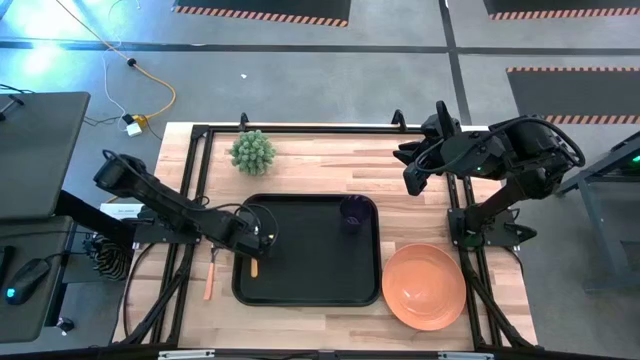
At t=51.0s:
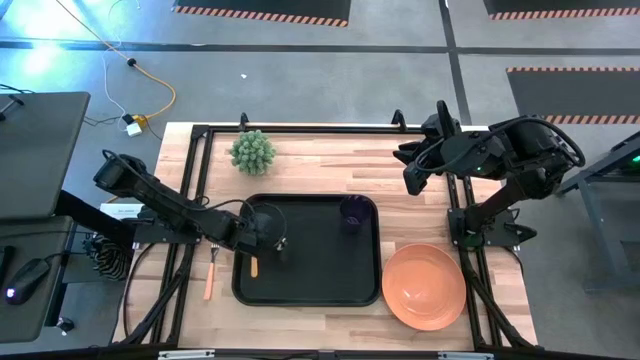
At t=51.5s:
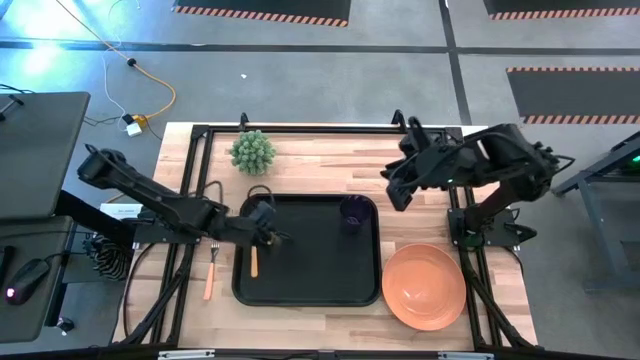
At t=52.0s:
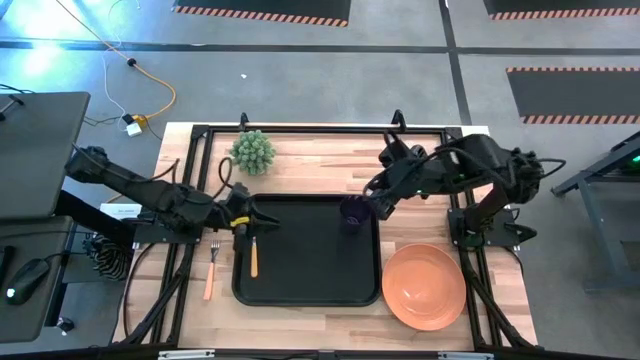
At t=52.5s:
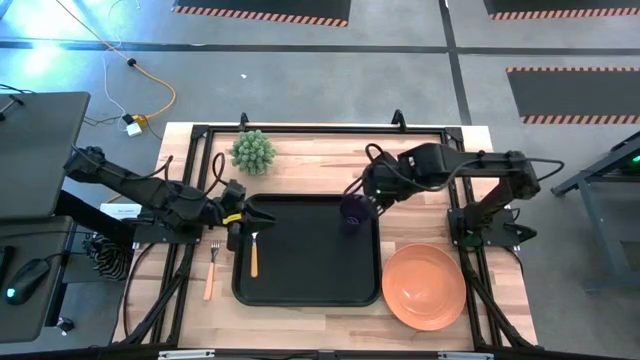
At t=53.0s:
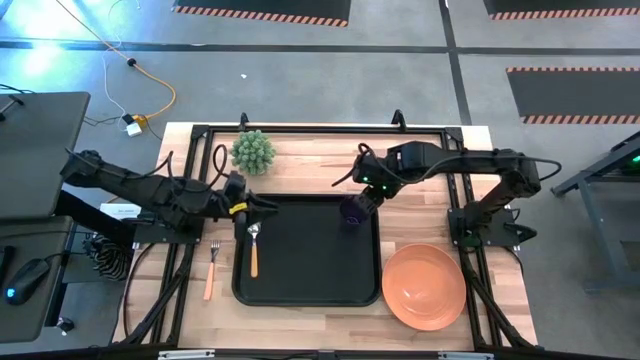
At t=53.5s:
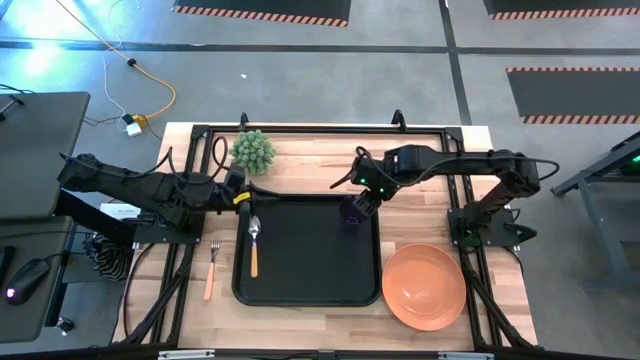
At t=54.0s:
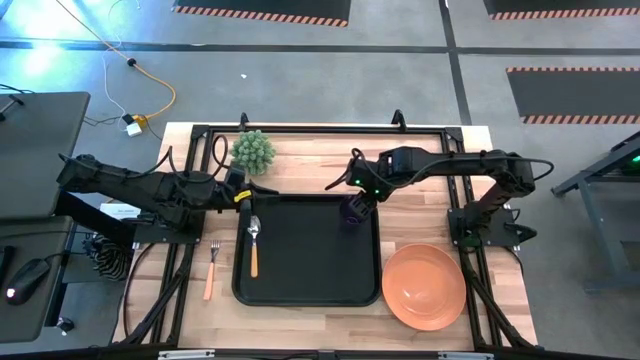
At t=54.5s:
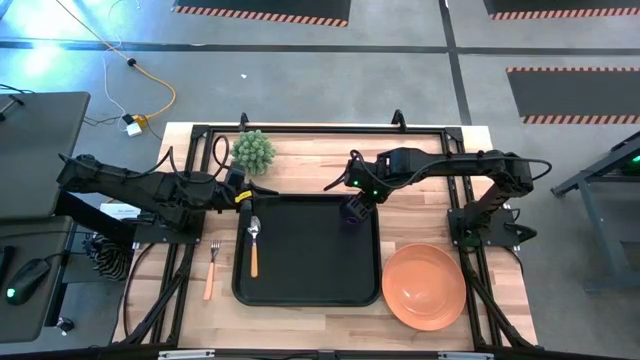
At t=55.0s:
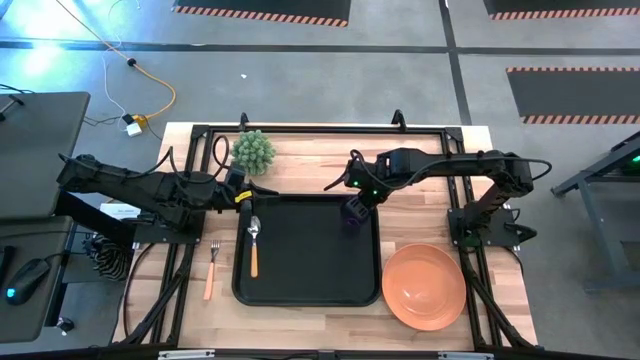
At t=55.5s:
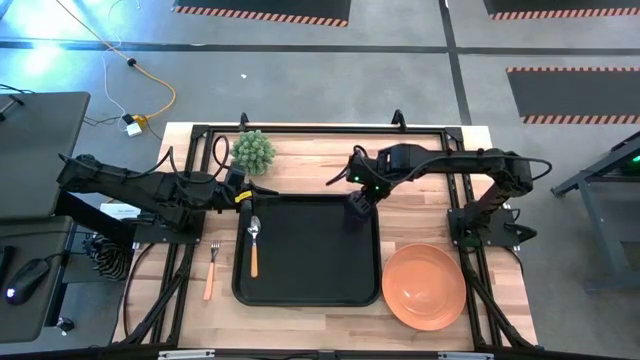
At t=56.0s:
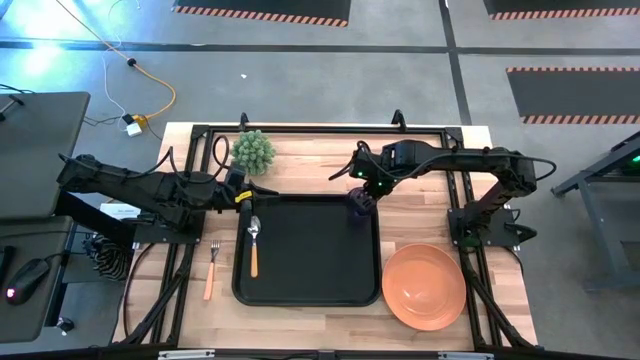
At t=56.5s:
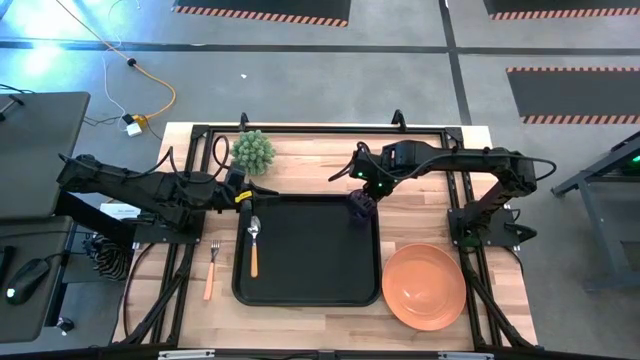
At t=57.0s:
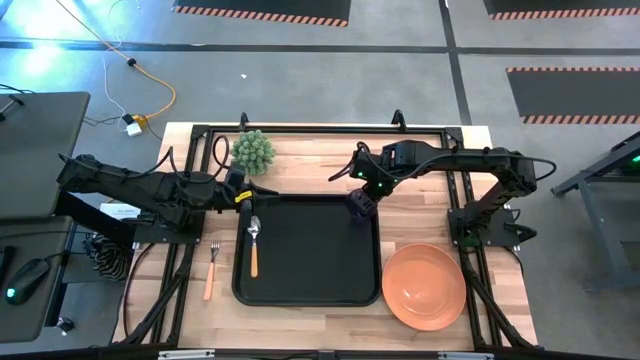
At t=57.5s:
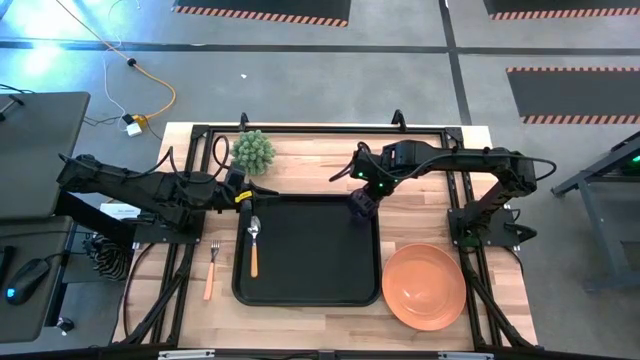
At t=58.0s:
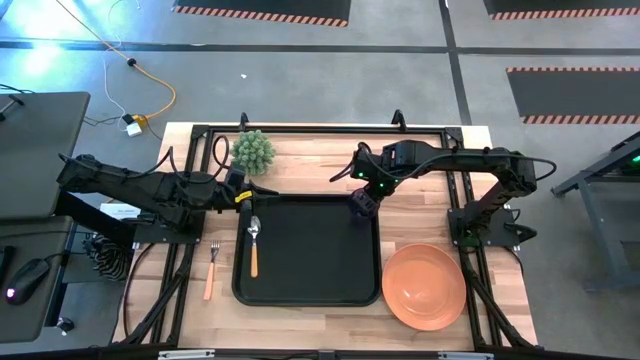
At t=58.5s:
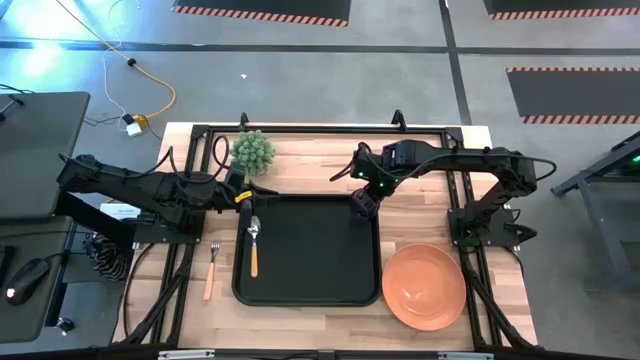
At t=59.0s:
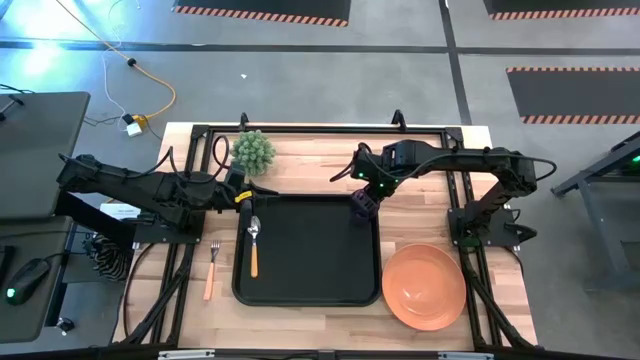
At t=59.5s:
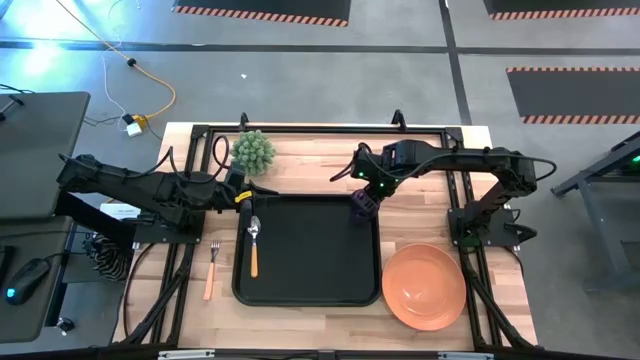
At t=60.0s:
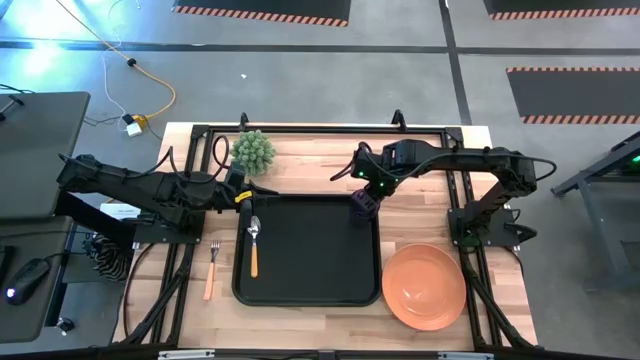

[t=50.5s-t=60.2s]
Task: Pick and place plate/cup/fork/spoon on tray
Adjust the purple cup on the black tray

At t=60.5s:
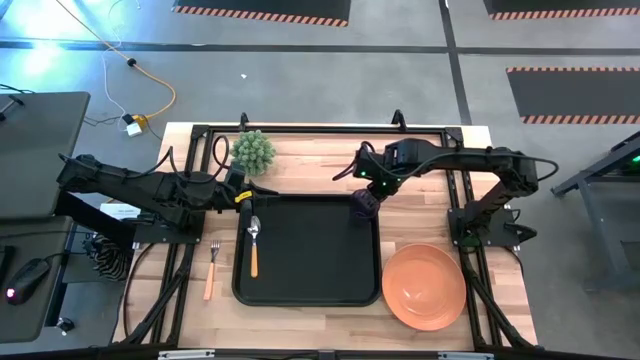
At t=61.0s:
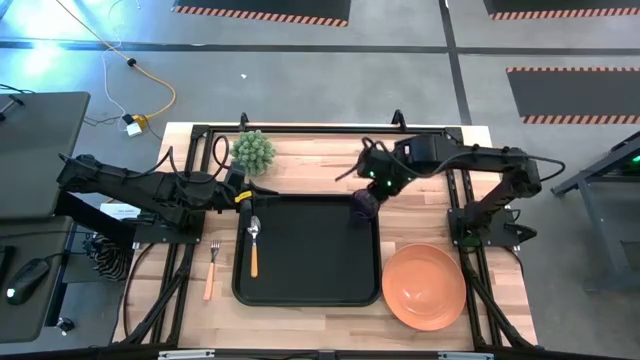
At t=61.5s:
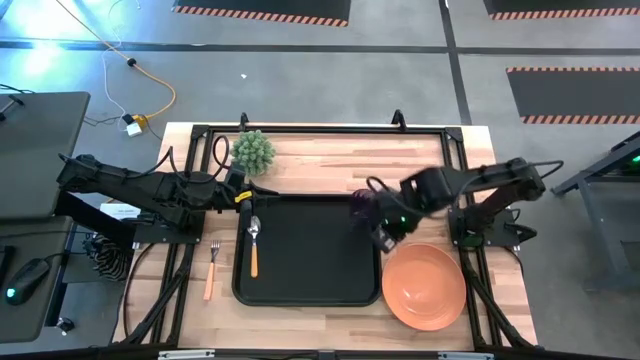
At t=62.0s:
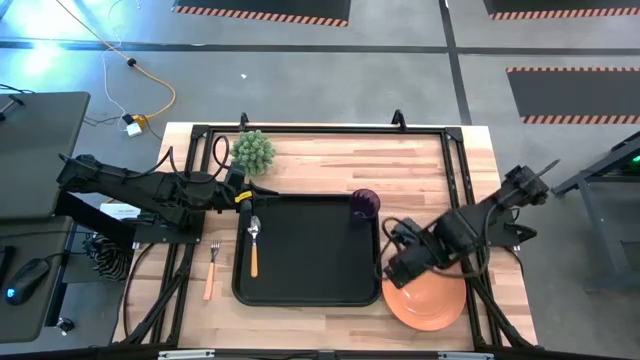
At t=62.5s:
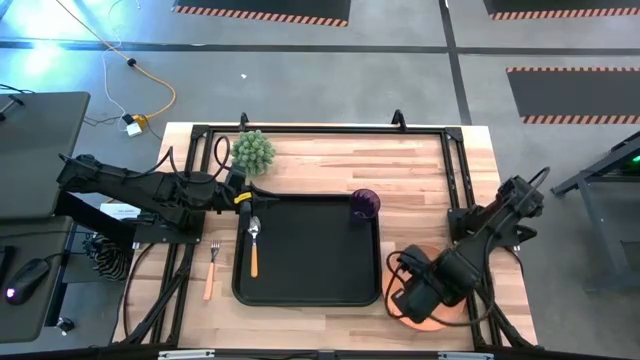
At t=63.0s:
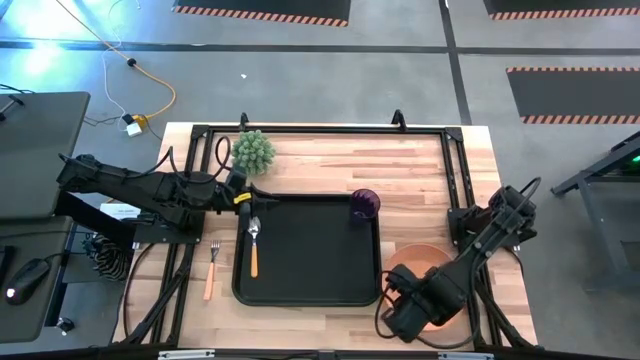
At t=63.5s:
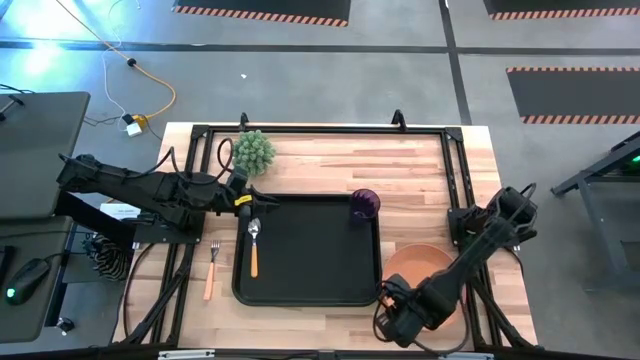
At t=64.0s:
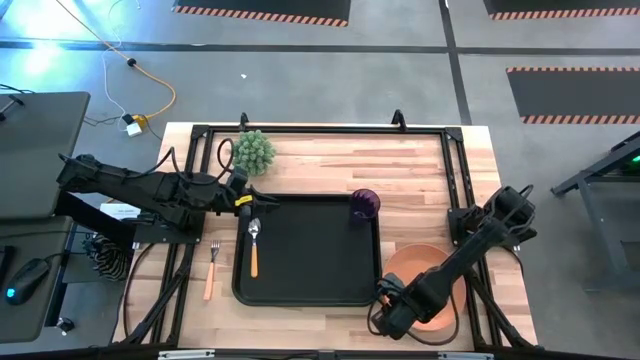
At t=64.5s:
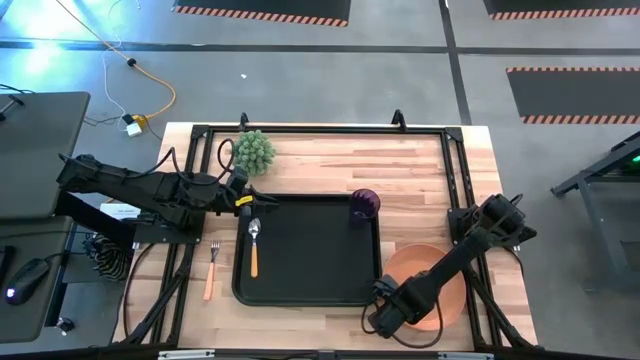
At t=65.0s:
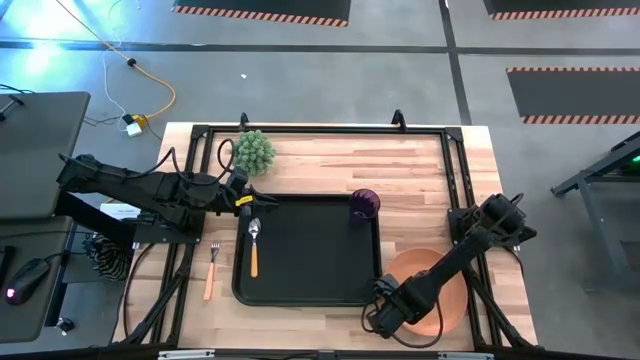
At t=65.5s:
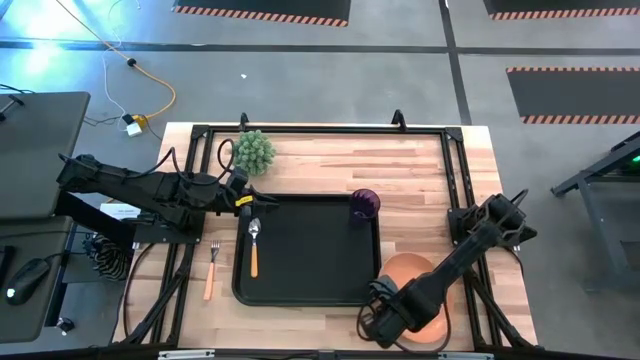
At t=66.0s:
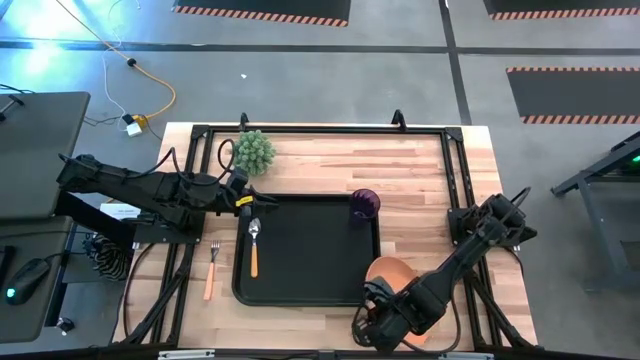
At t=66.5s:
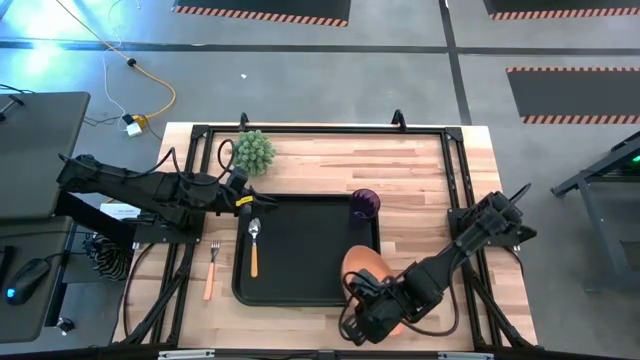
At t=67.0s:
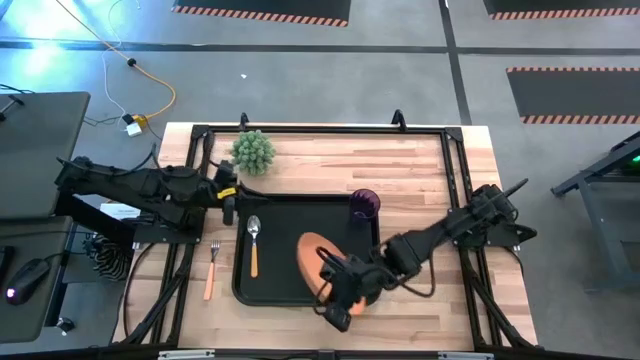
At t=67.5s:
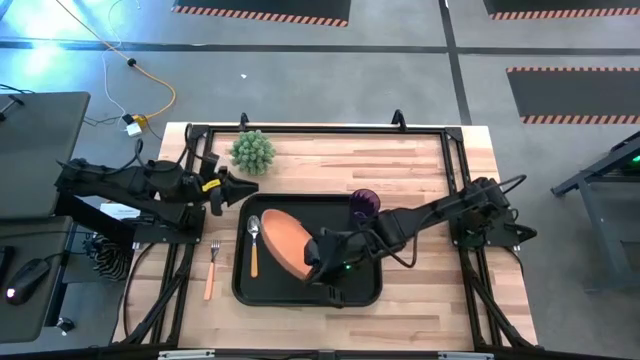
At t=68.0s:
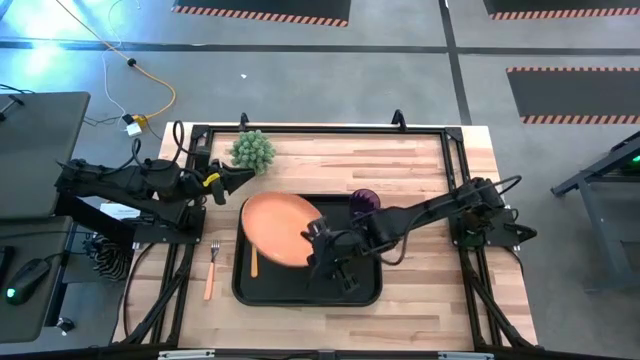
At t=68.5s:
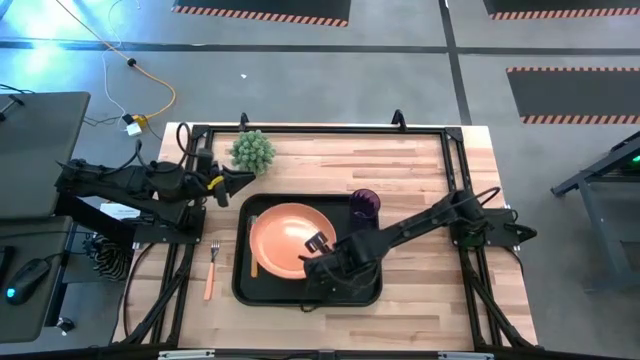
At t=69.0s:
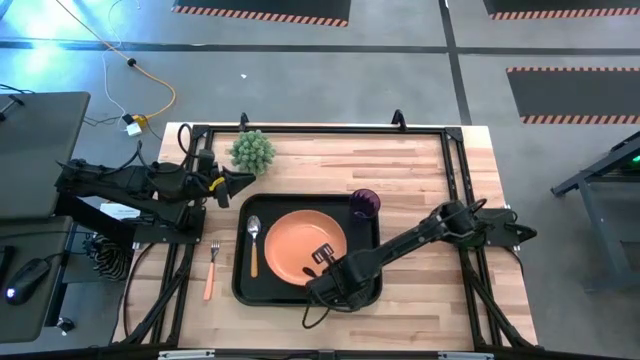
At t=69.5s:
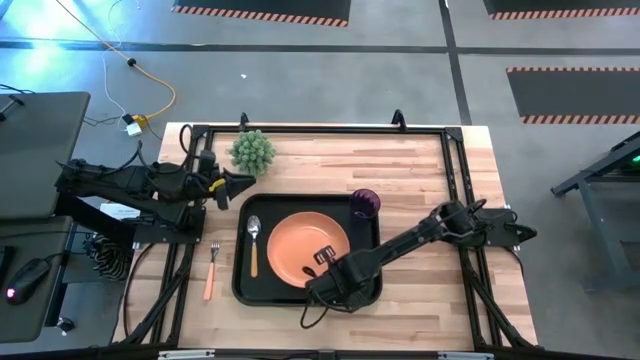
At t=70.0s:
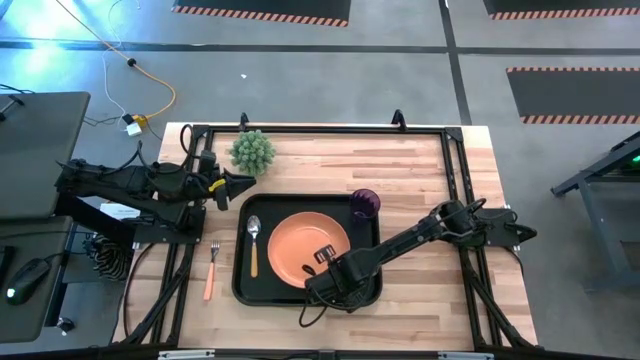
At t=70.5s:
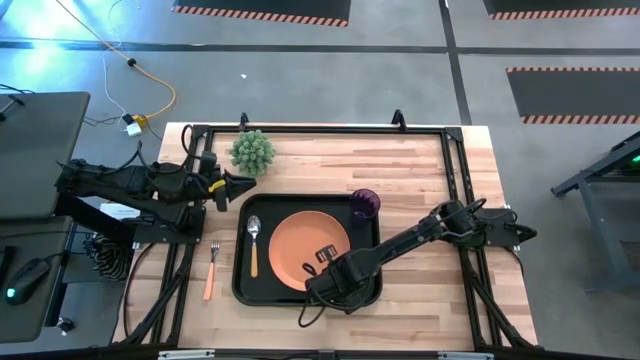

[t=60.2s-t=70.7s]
Put the orange plate on the black tray to the right of the yellow spoon

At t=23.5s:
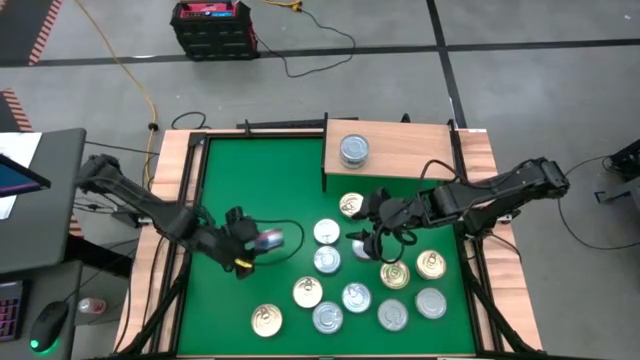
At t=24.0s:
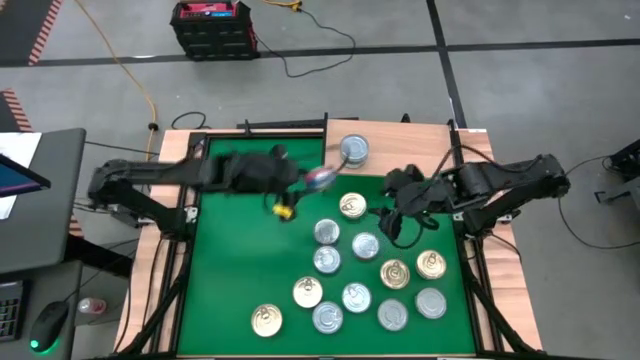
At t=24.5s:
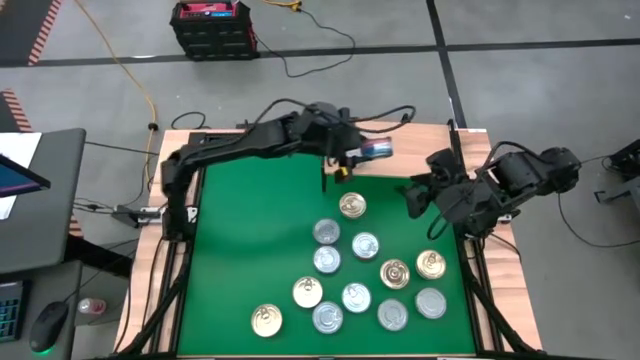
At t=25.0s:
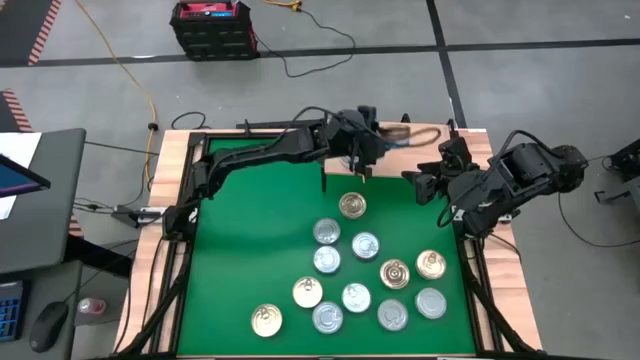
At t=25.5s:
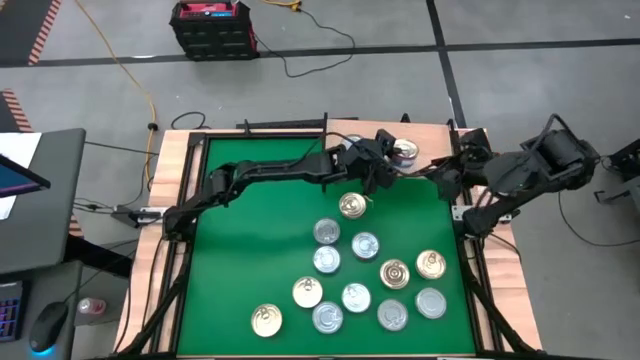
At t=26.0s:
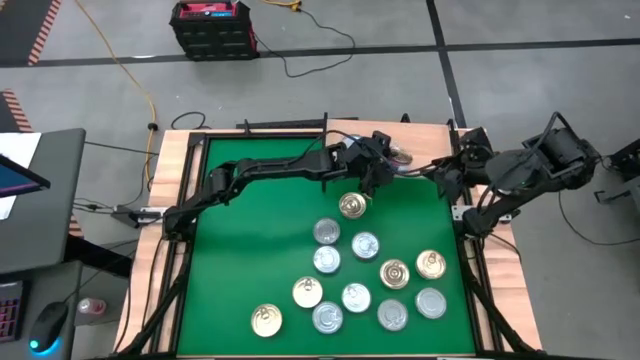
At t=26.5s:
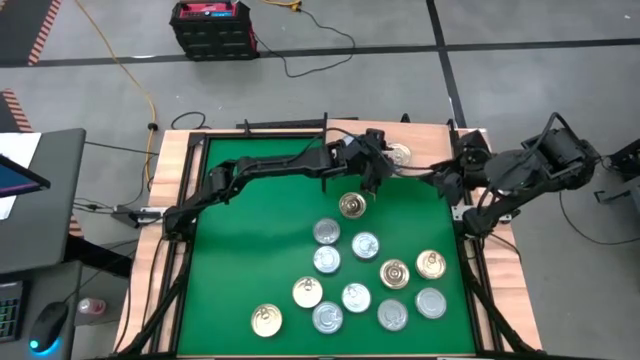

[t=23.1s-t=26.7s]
Task: Stack canned seafood by type on shelf
Put the pink tuna can on the shelf
